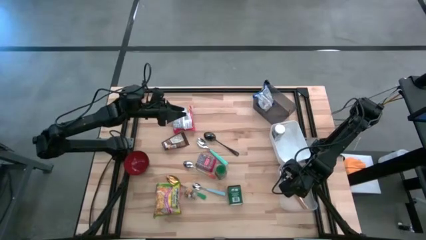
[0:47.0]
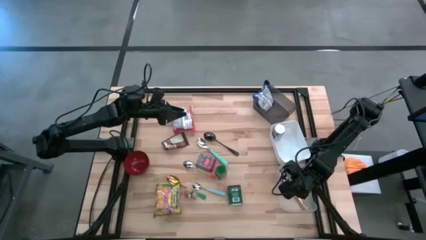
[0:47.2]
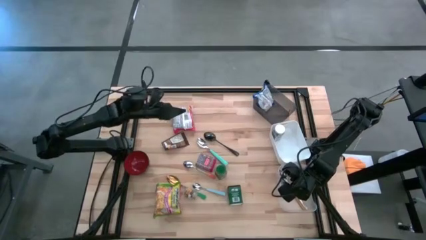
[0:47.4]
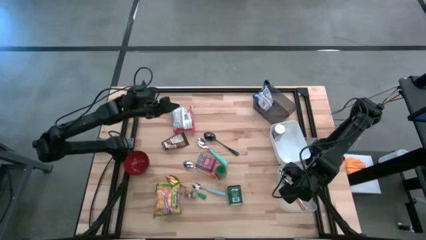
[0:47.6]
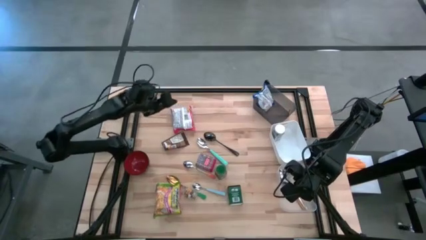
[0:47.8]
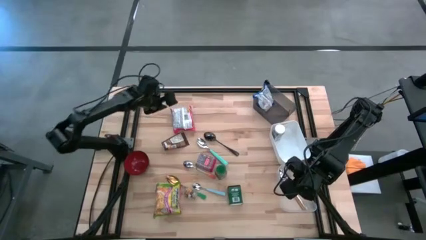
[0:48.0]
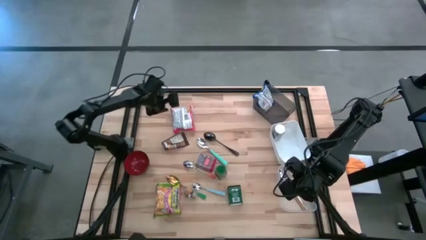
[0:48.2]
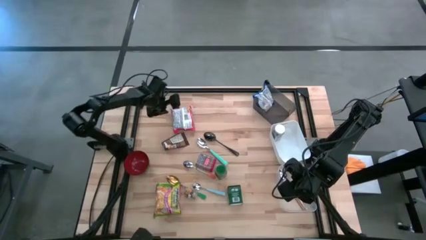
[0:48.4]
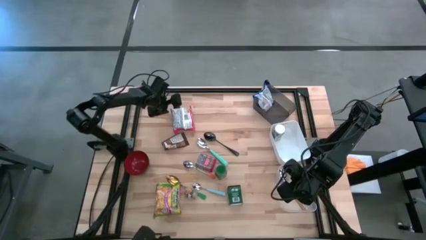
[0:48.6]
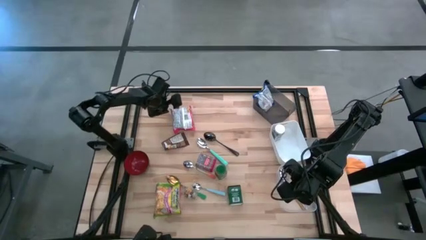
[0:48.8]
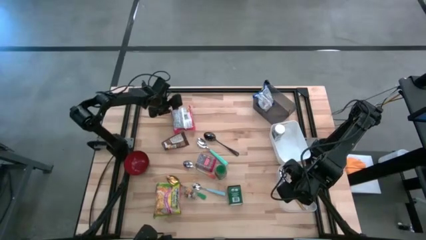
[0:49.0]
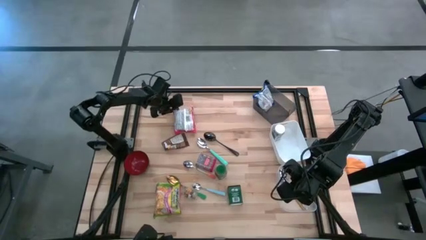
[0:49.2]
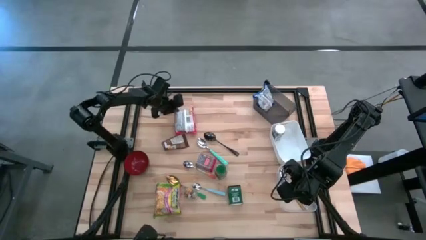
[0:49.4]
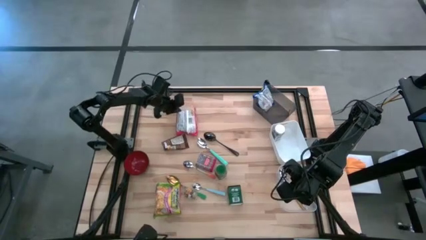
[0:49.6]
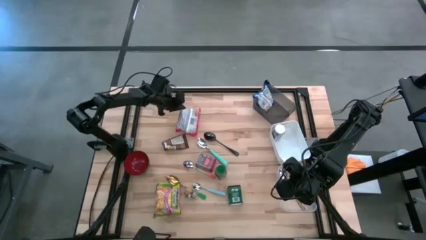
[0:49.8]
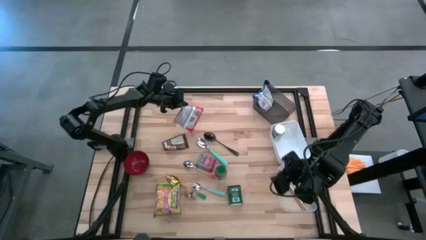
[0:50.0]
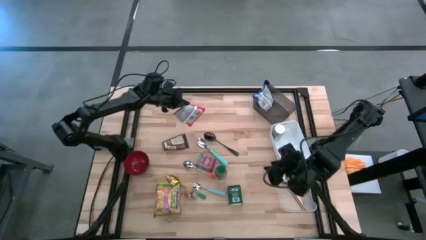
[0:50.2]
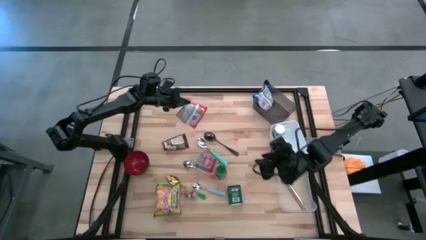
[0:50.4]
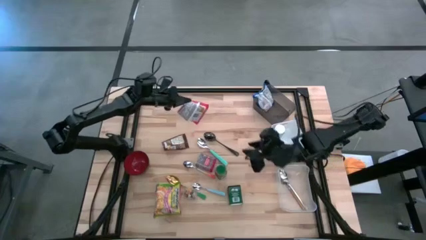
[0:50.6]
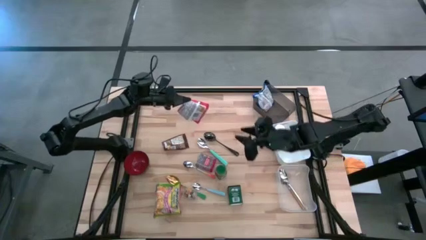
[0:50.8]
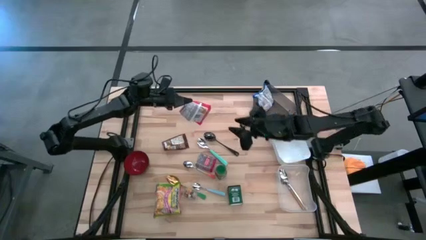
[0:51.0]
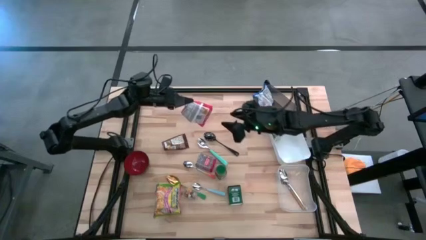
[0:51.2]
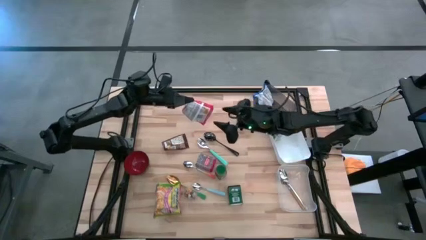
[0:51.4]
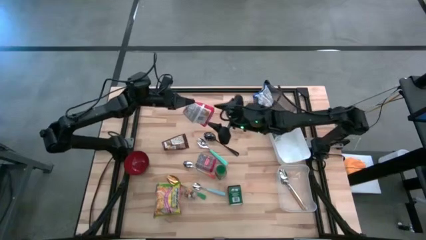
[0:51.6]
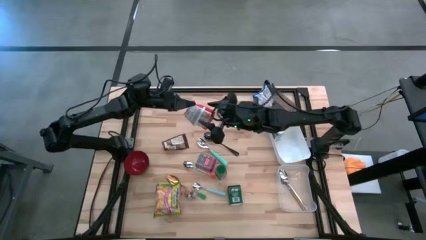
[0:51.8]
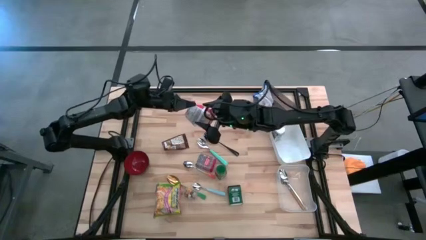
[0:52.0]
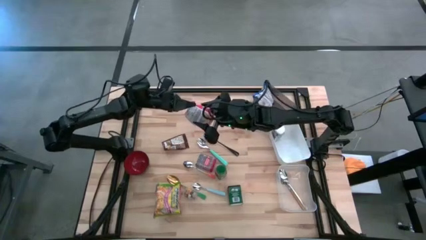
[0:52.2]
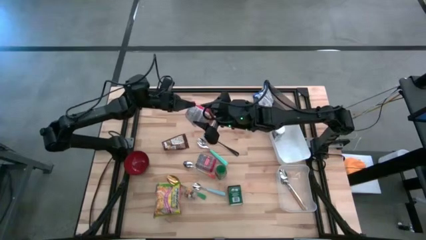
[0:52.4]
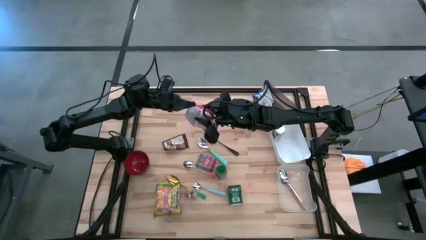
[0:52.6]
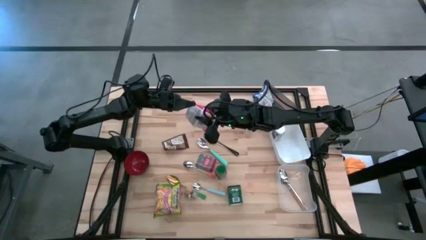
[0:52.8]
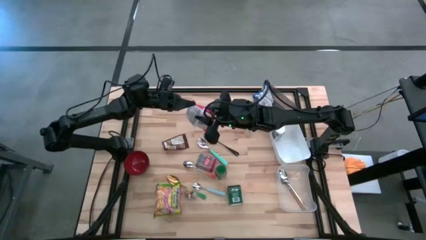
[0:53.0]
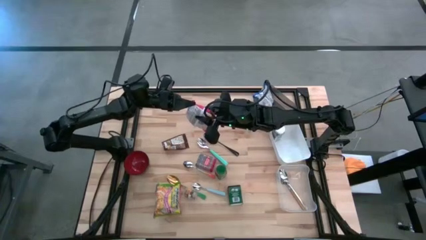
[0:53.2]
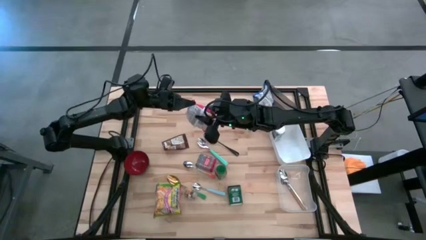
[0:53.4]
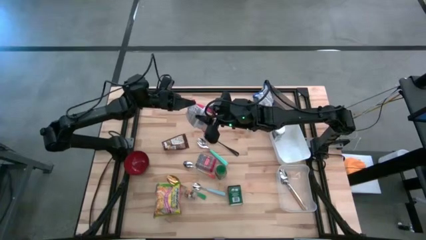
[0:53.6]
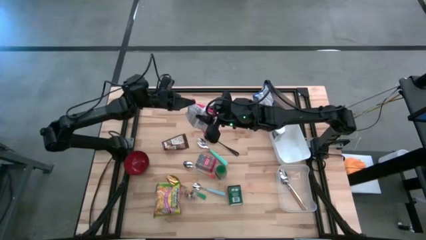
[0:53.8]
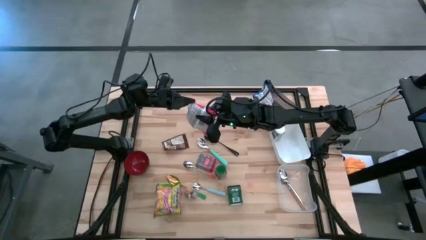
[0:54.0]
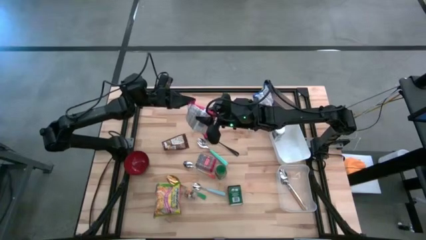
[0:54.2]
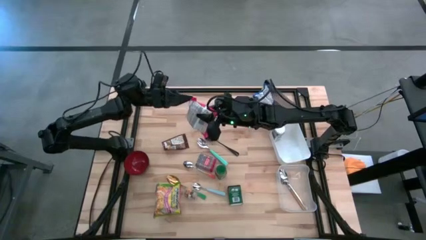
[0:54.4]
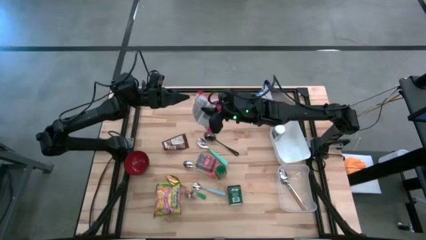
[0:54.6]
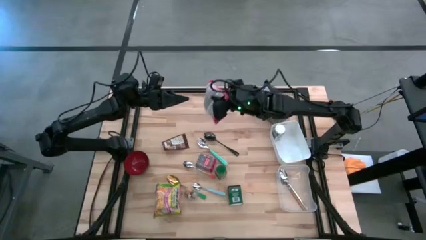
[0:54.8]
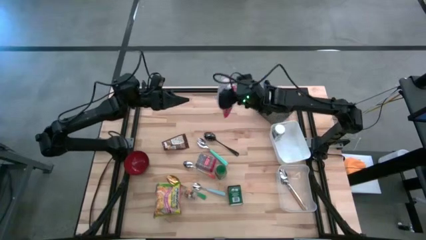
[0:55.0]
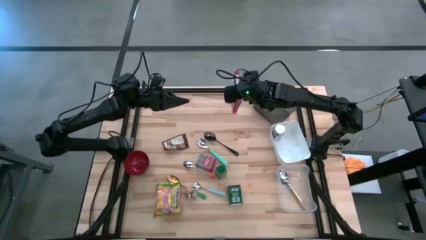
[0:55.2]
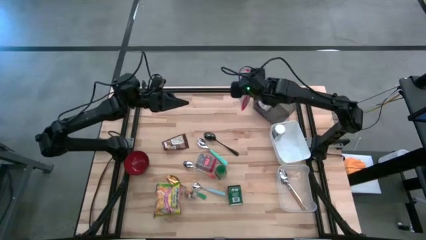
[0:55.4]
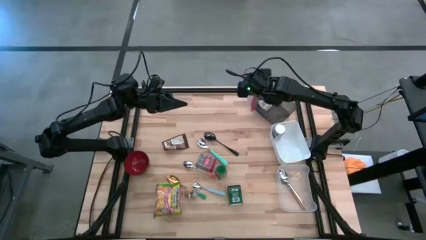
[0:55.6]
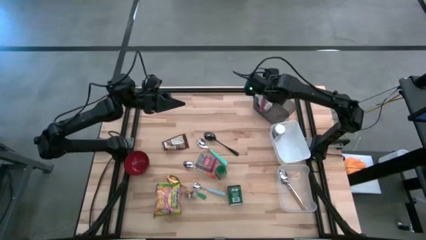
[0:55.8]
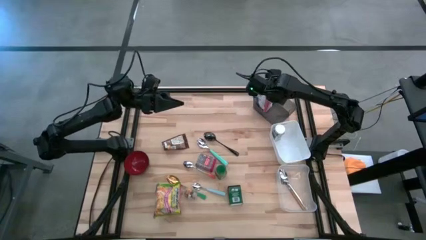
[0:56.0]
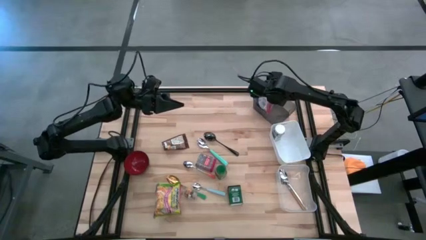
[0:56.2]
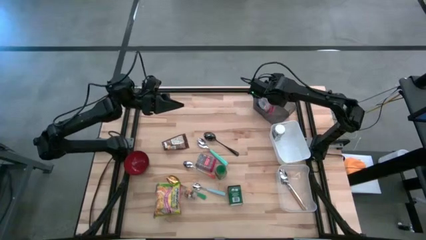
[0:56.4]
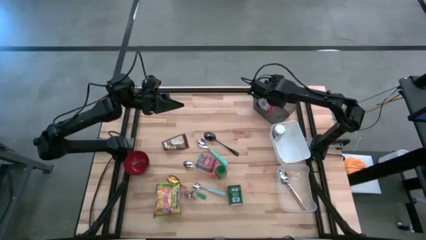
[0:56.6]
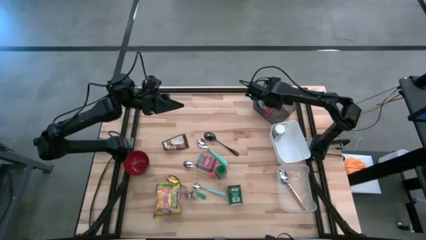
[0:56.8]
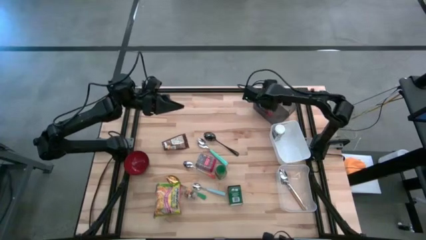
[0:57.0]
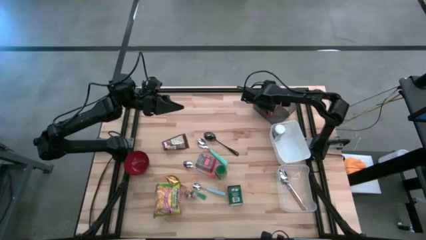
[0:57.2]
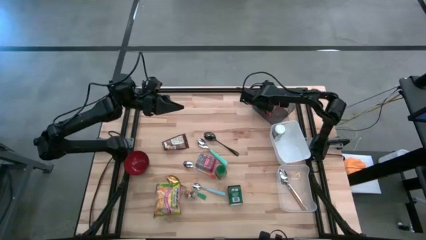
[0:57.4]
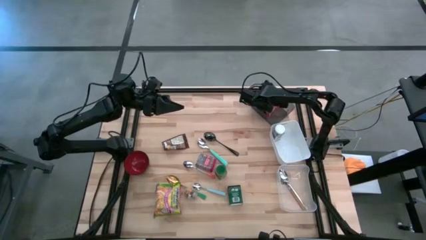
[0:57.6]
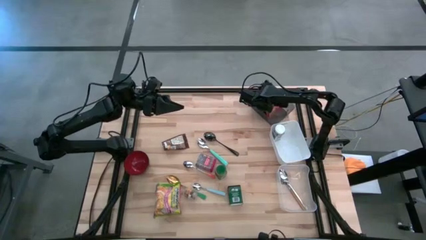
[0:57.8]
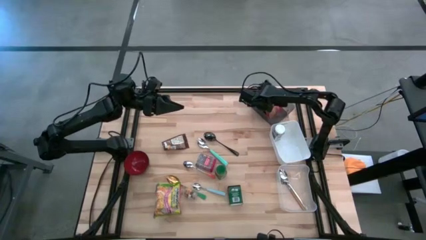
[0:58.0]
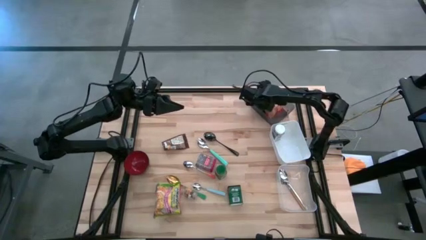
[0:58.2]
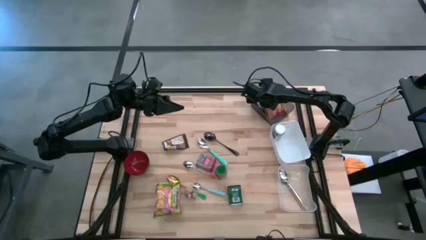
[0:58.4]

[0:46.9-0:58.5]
Put the red noodle pack into the black bin

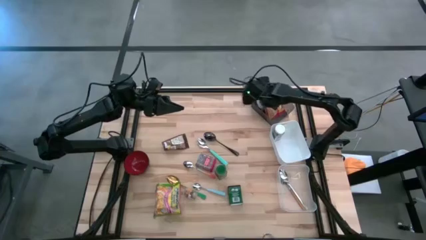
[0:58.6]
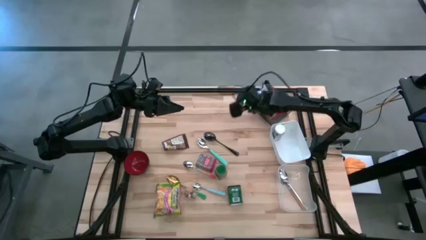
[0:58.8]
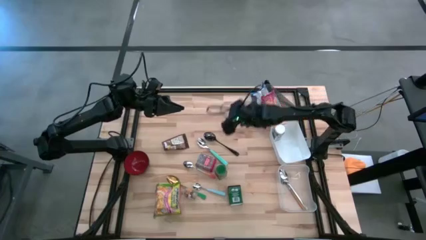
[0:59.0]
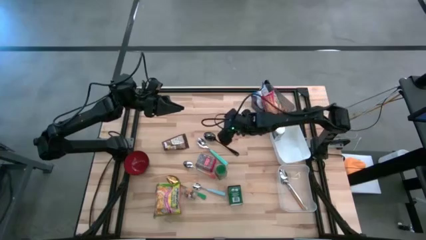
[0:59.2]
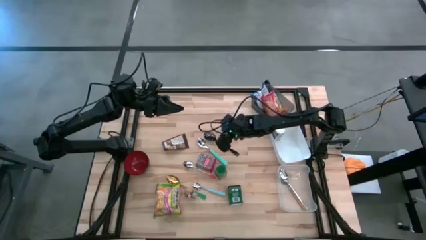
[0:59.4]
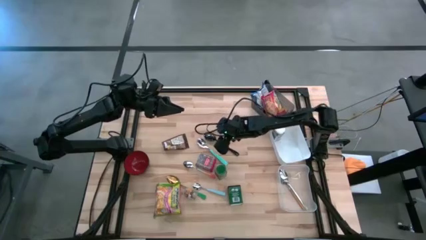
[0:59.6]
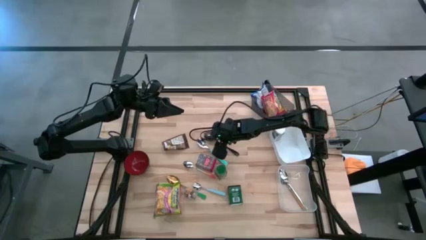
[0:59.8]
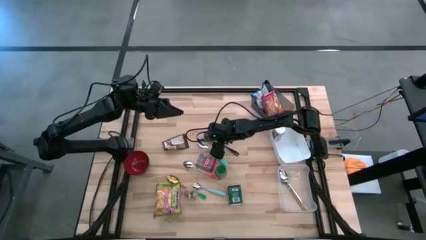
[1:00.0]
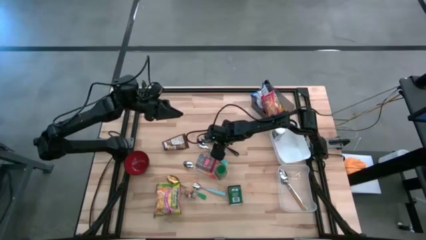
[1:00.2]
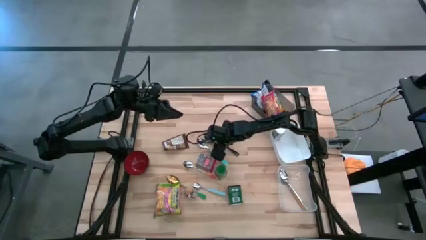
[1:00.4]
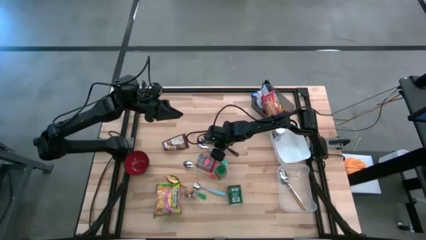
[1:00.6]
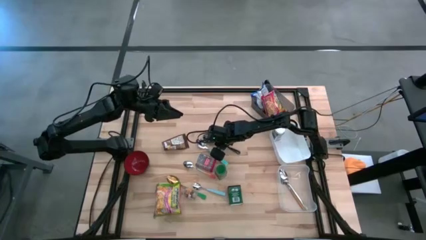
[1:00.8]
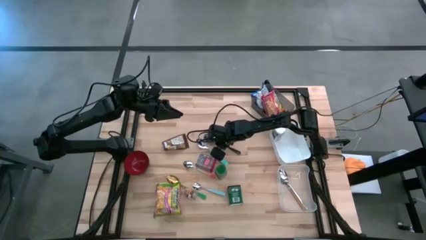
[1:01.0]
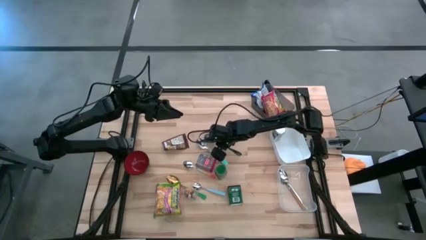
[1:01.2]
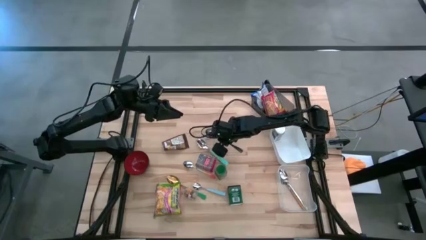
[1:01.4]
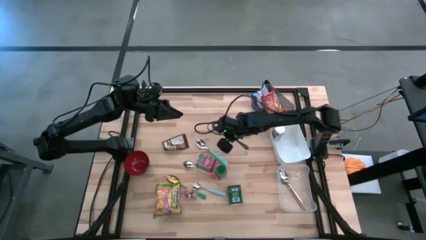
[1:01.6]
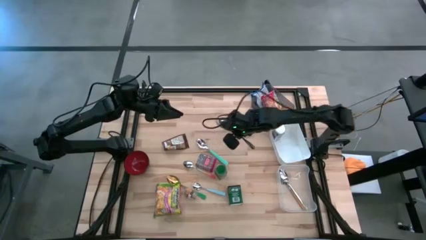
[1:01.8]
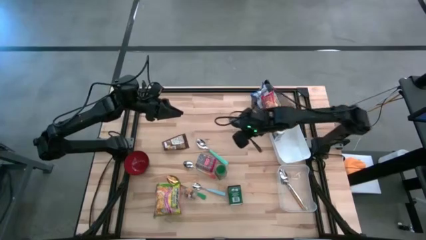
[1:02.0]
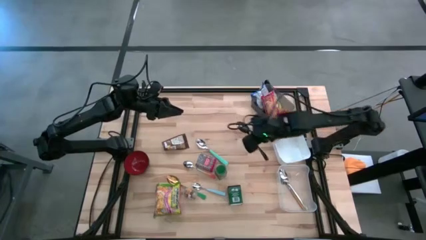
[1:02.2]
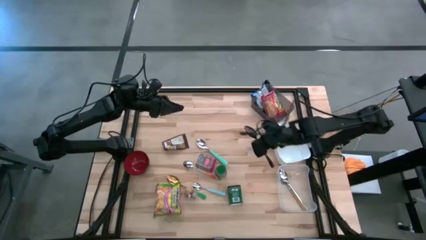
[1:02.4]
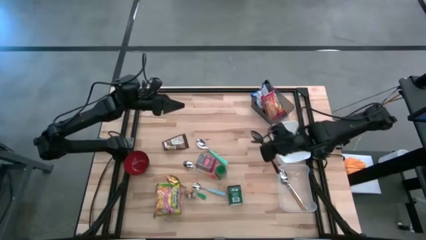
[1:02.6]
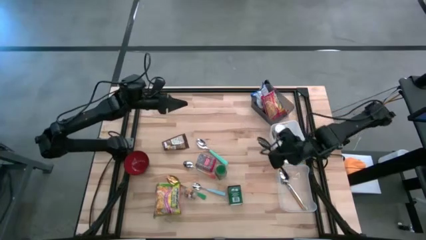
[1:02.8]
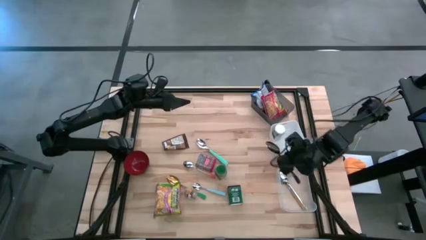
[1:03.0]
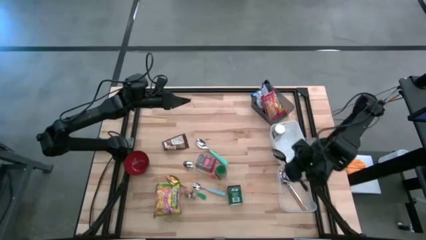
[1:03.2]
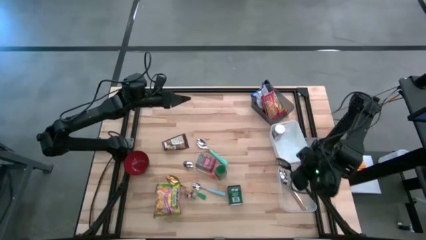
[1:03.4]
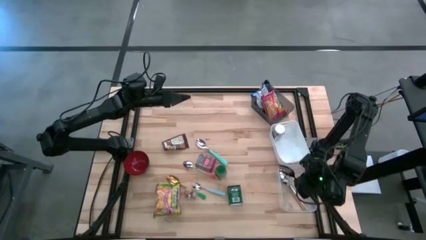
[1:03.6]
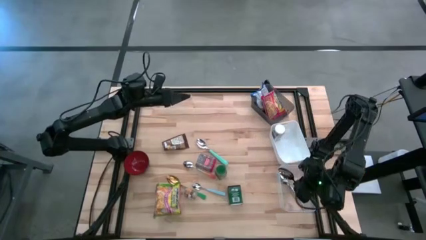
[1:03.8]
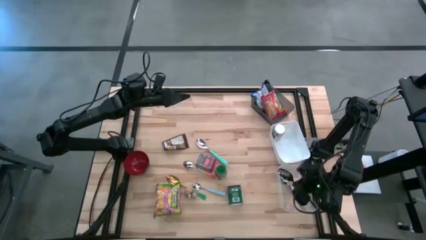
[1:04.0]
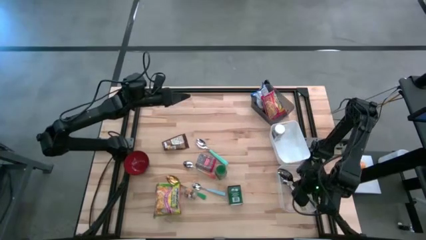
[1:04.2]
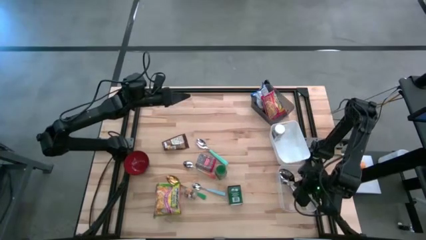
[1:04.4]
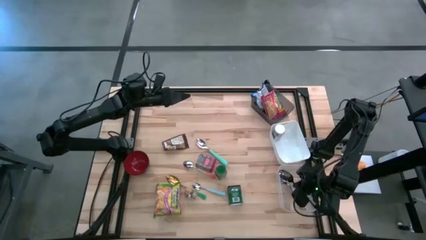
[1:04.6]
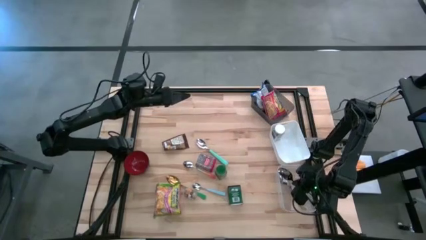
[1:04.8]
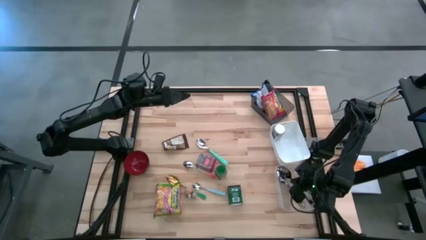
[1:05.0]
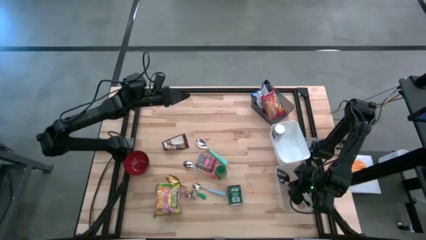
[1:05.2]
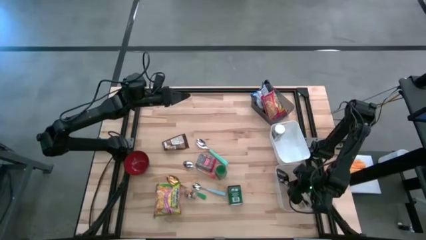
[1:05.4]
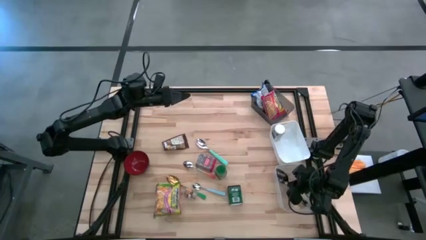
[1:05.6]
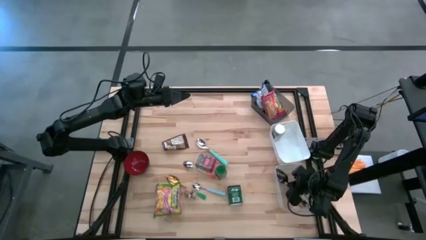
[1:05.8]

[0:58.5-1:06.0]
Put the black spoon into the transparent bin
